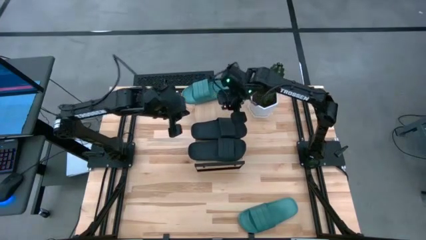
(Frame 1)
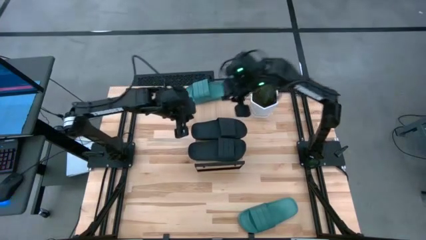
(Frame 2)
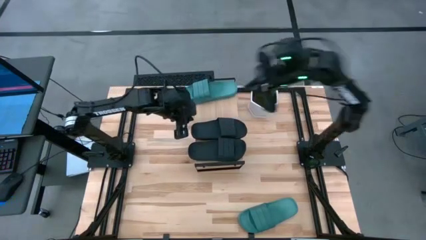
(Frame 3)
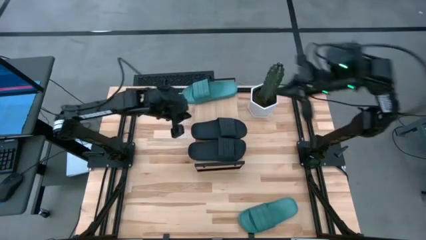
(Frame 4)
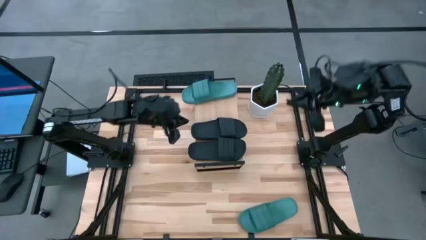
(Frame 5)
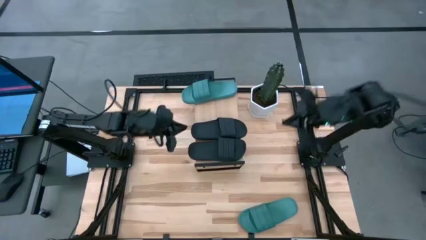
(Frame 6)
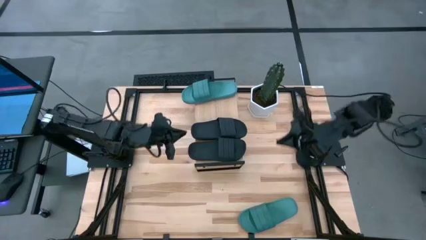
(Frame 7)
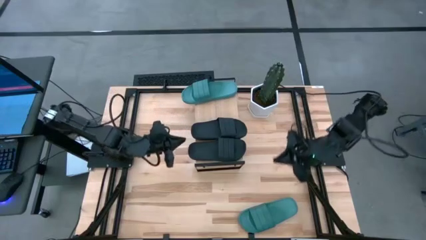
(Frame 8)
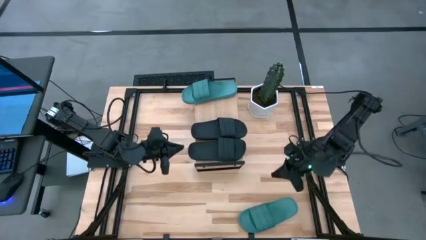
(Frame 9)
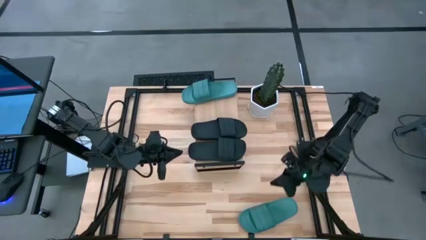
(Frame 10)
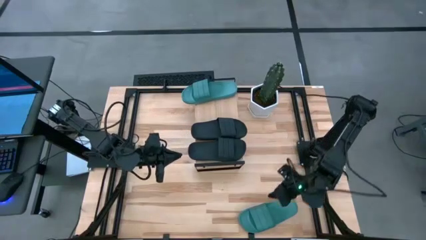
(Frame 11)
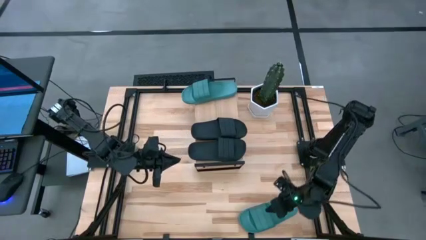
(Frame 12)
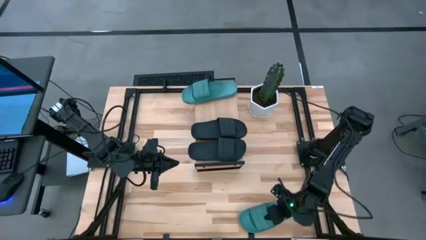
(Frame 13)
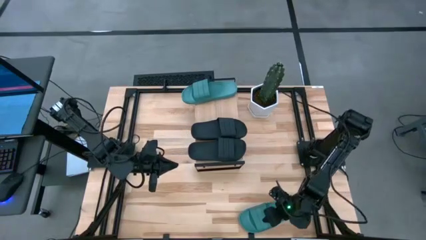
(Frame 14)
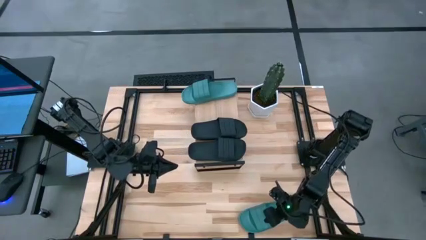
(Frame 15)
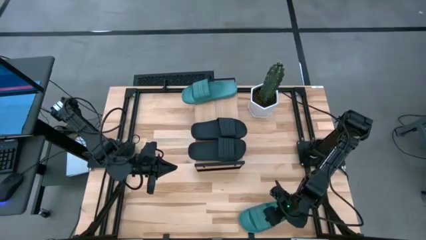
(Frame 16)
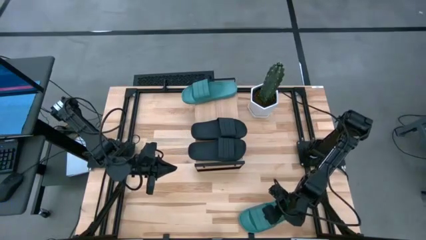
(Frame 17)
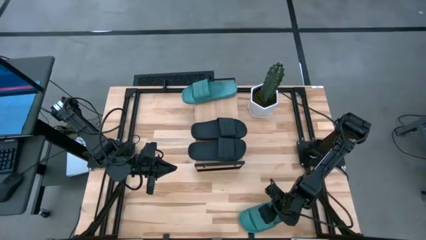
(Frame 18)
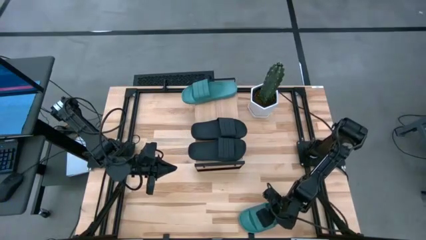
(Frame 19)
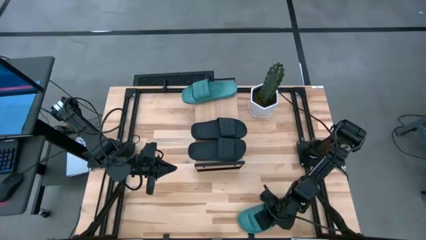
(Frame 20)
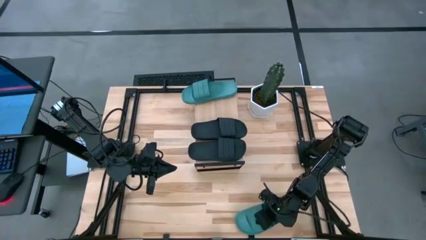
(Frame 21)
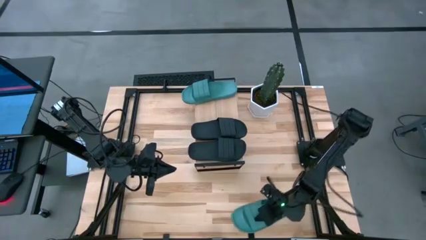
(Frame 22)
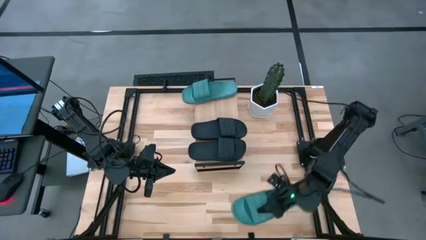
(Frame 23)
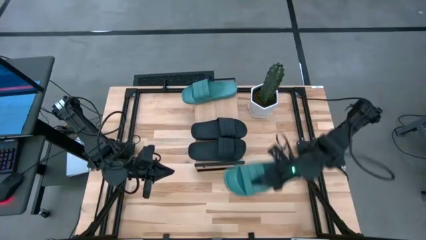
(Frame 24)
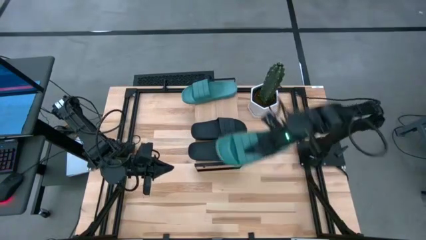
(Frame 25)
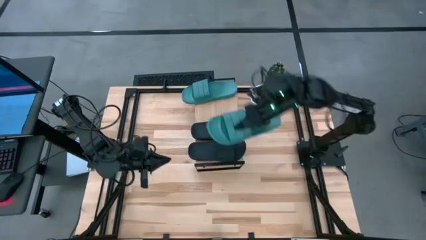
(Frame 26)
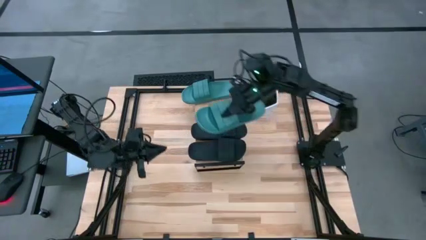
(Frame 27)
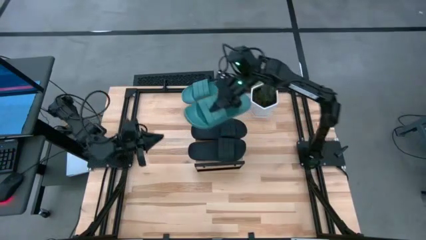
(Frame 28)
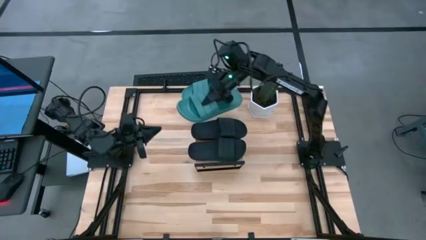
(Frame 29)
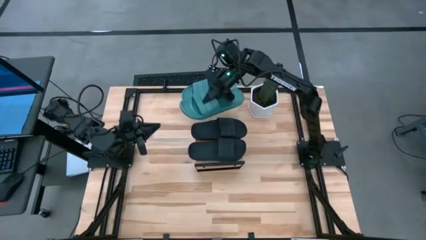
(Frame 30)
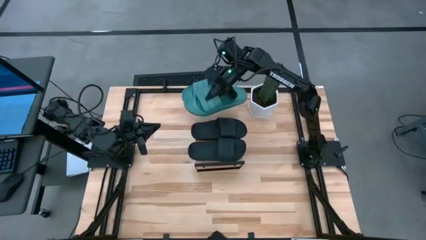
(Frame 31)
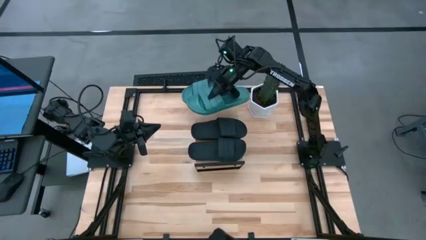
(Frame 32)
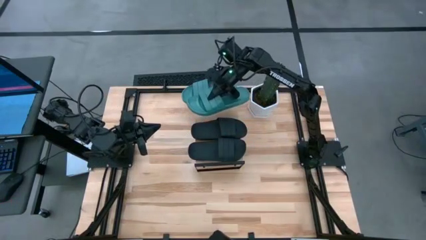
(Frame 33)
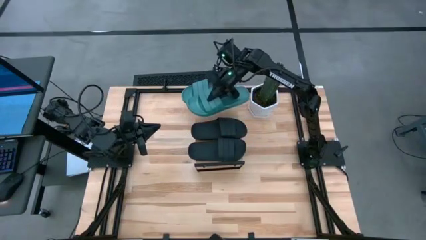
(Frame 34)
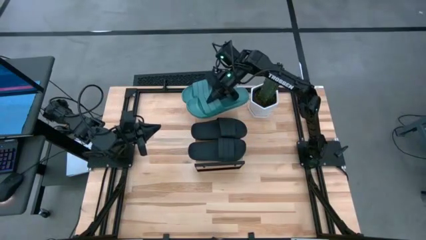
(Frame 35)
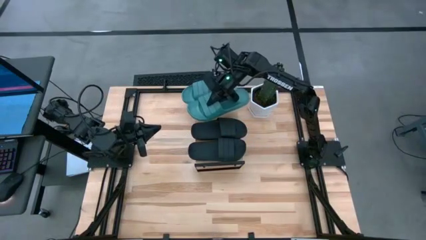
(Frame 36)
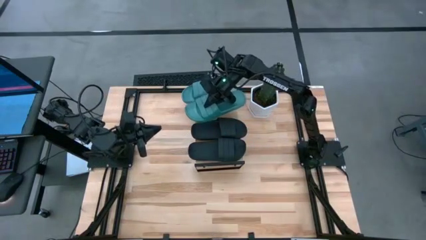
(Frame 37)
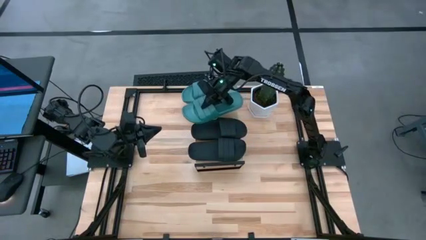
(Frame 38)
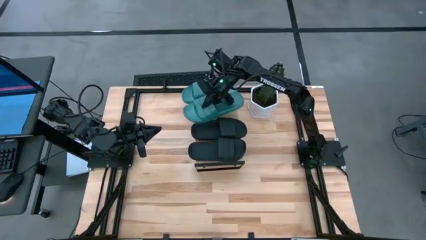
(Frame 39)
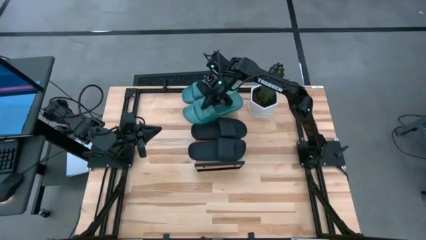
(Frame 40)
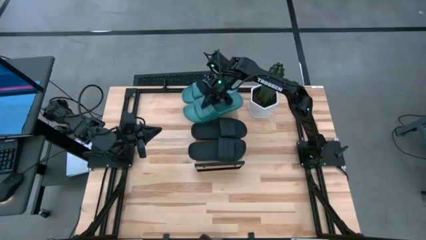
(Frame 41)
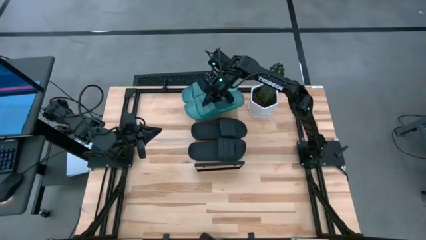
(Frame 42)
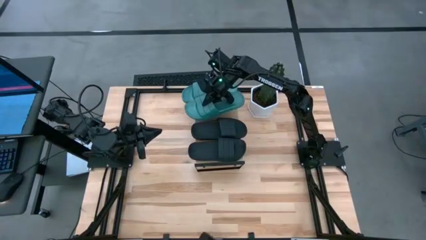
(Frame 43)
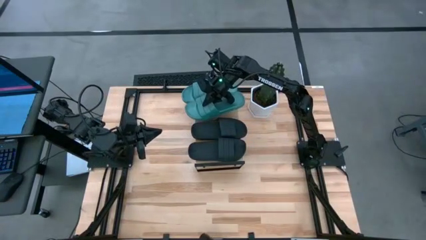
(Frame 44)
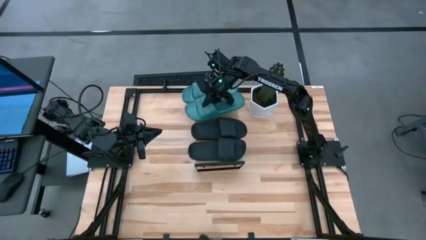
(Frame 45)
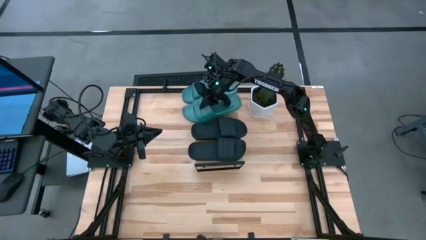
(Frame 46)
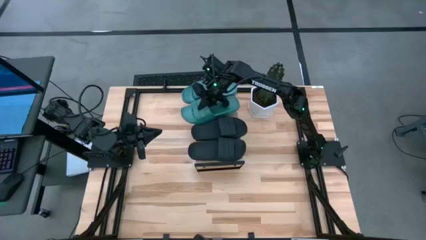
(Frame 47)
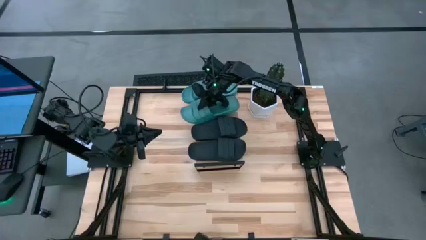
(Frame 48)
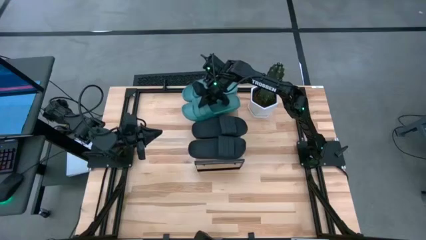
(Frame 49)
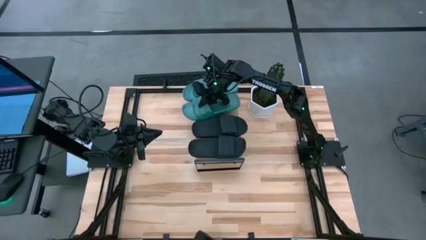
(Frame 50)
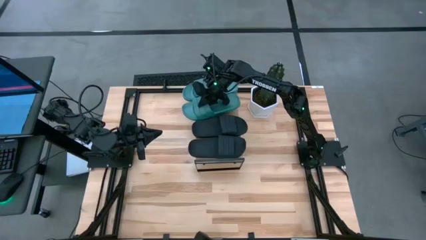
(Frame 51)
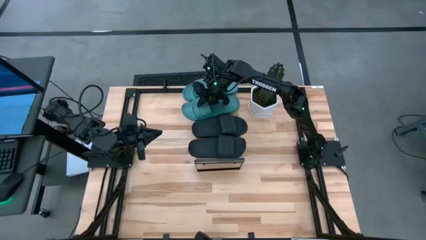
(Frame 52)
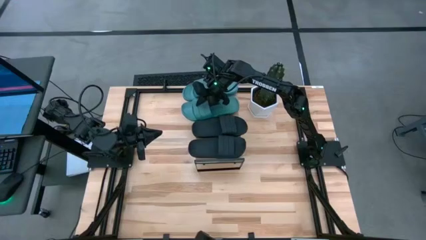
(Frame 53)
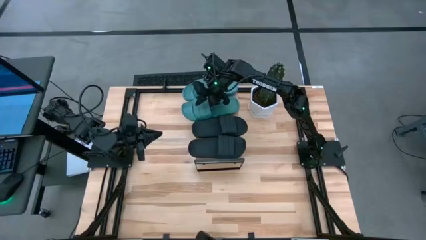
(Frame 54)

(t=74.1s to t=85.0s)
Task: Pick and place slides into the shelf
Put the green slipper on the shelf

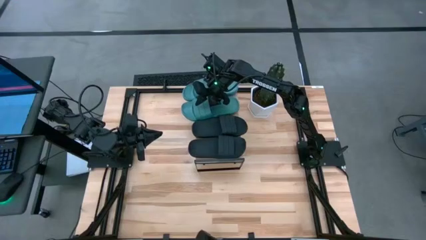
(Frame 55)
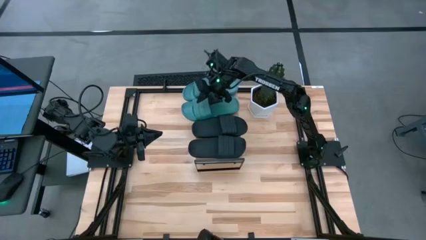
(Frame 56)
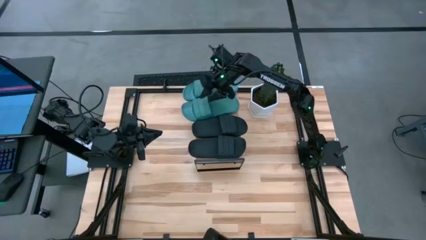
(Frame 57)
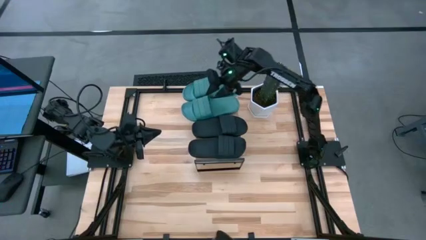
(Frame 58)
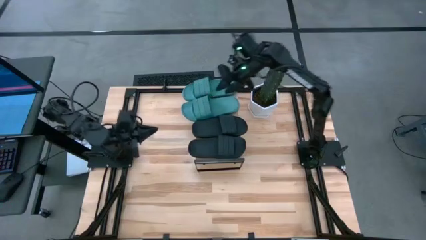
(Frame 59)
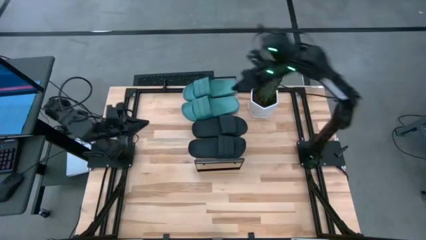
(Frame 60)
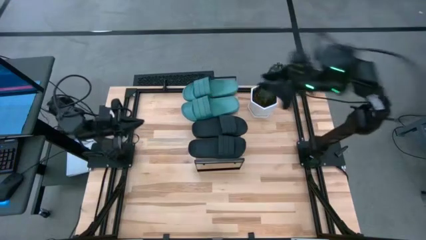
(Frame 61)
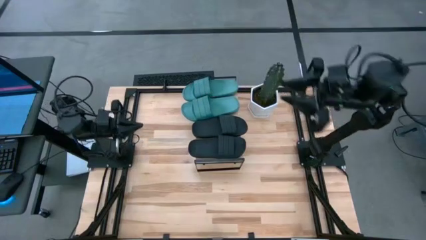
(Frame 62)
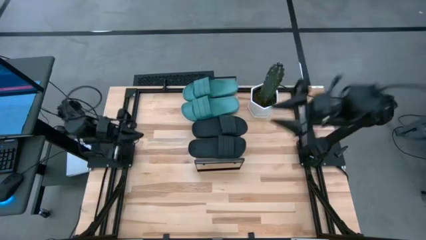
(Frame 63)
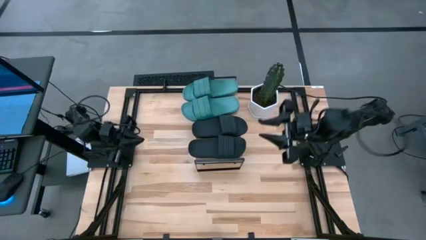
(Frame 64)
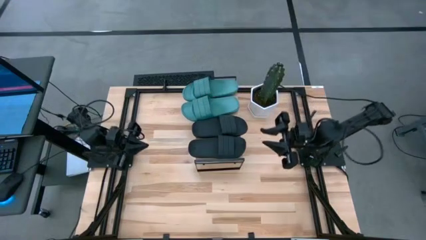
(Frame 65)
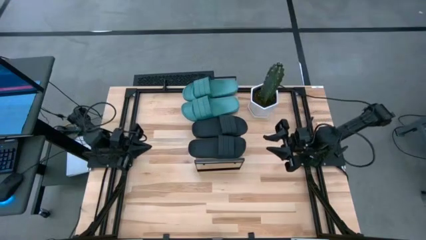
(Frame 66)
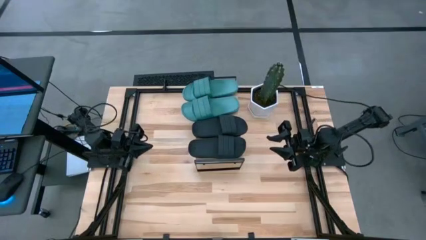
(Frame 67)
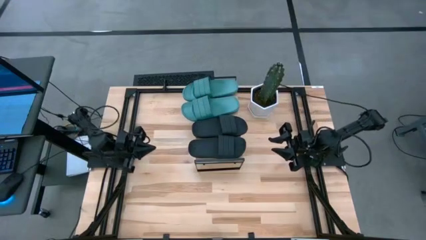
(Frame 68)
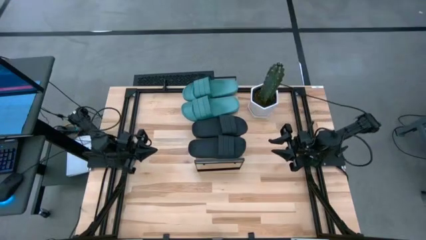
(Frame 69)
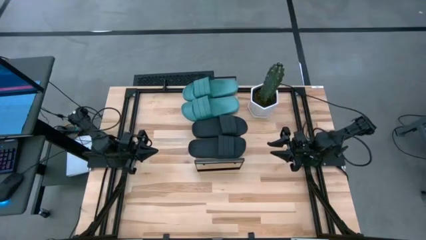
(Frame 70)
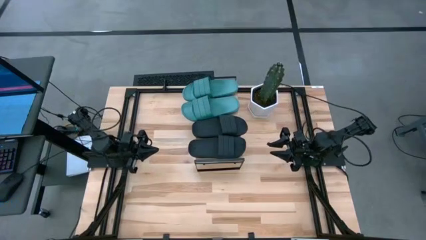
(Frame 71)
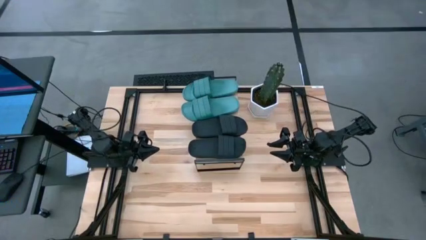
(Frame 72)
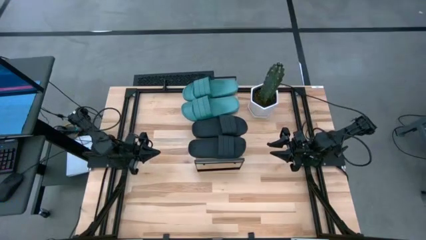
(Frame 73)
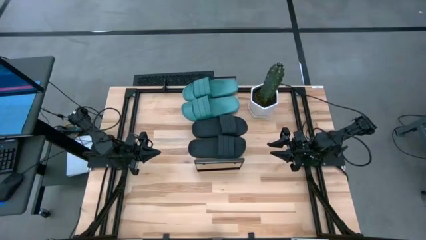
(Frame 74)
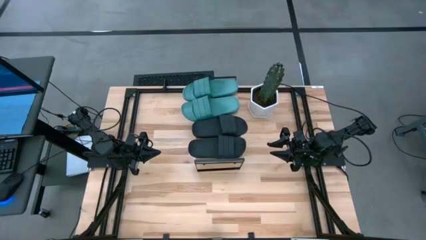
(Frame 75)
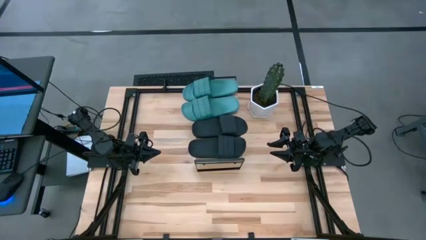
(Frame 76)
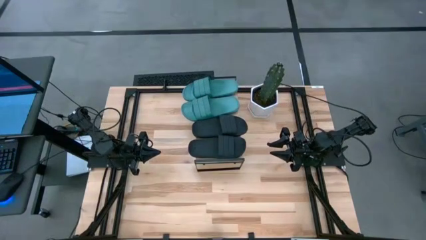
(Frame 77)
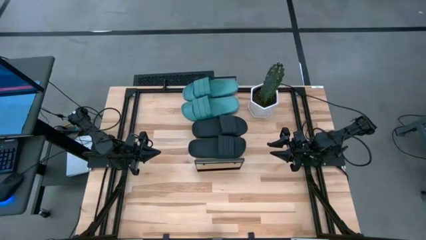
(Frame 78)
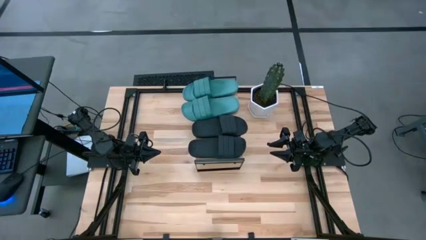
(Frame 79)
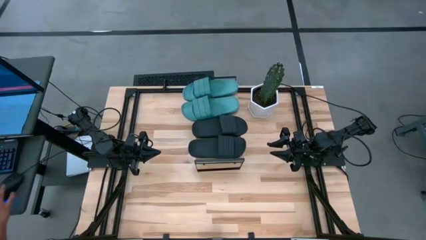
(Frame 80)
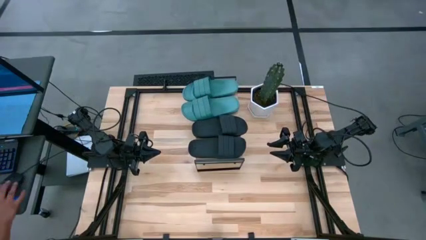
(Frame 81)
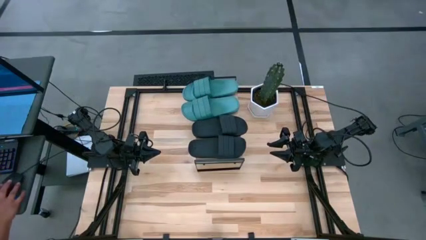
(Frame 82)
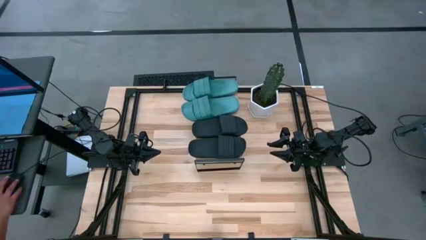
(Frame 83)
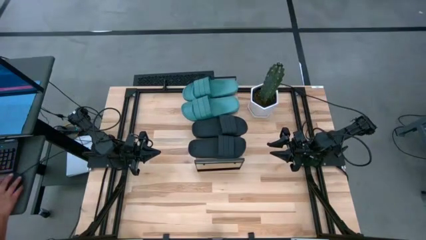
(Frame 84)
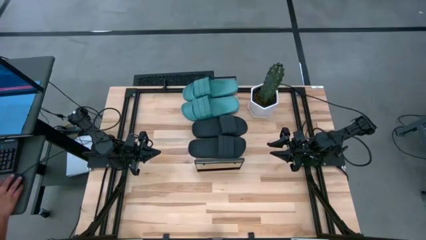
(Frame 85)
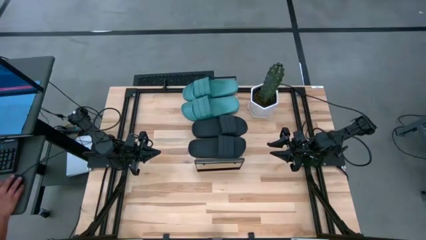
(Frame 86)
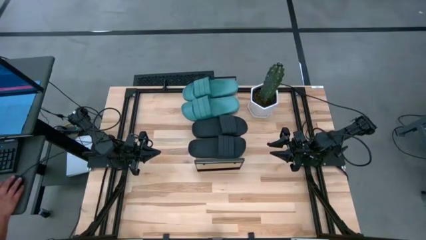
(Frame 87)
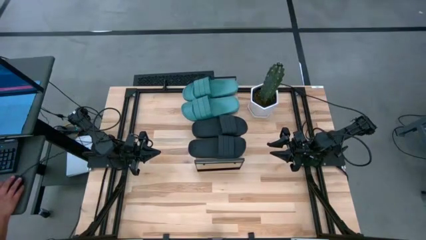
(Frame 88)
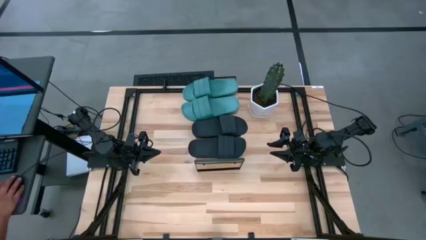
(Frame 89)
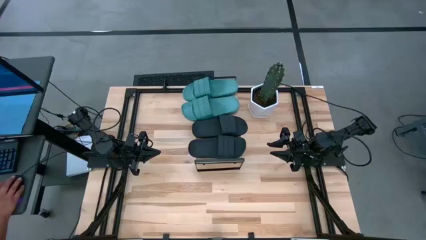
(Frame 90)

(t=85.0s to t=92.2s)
Return to Home Position
